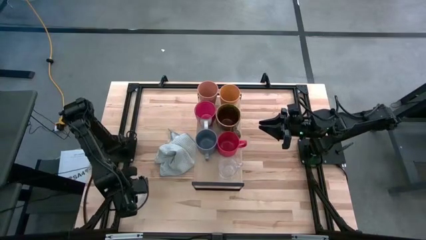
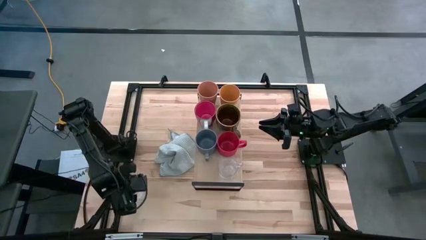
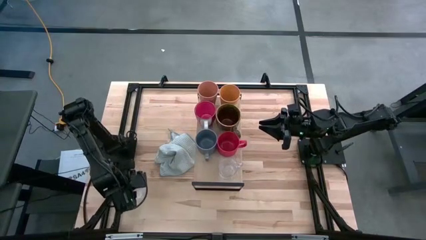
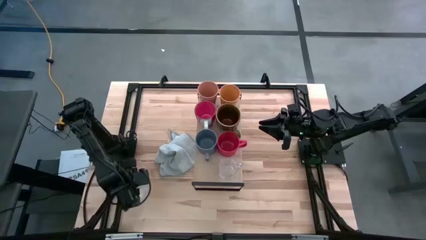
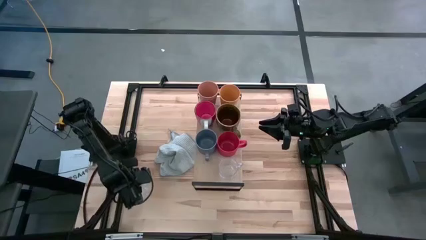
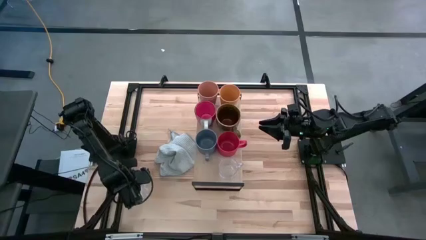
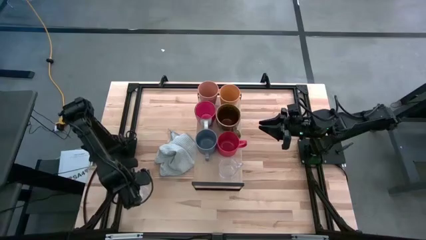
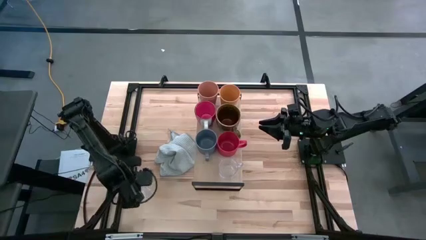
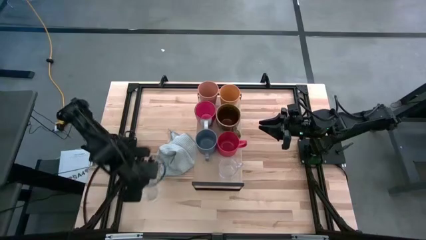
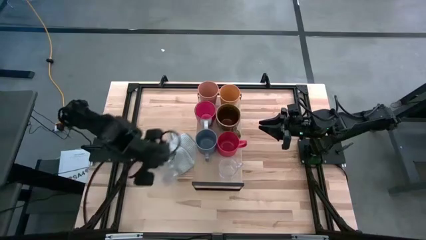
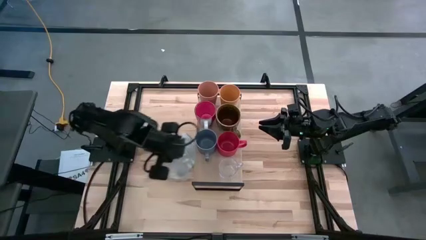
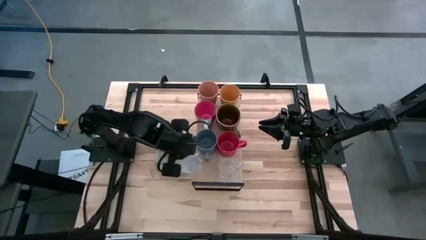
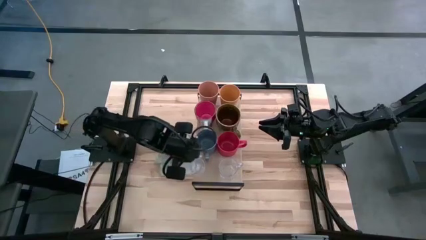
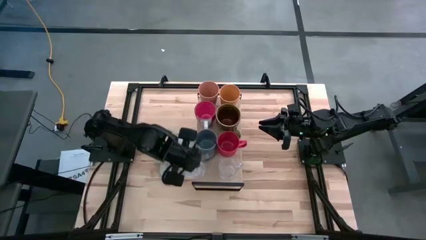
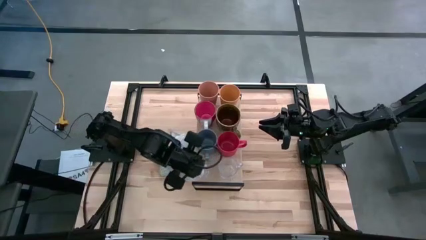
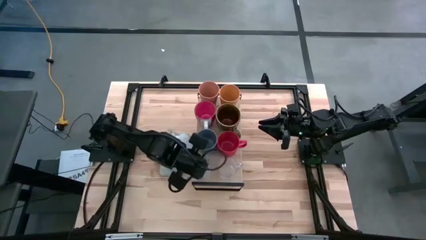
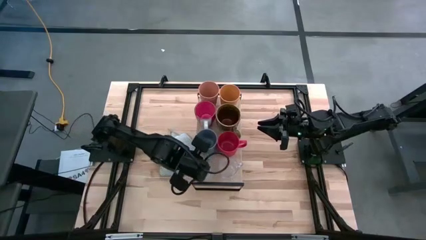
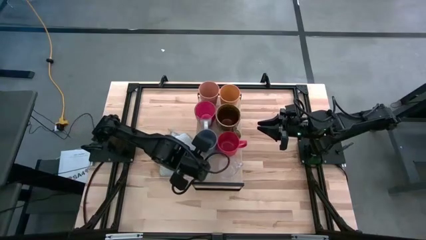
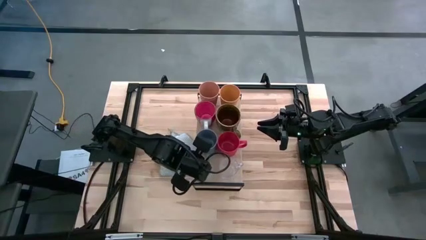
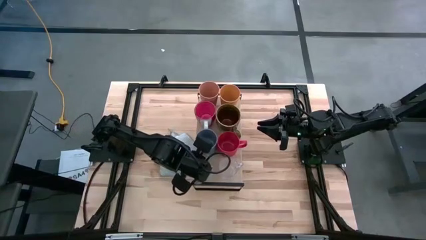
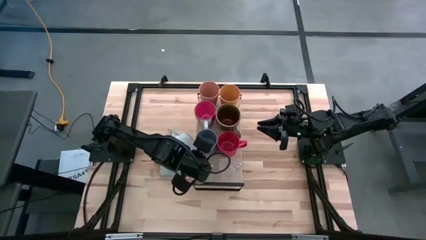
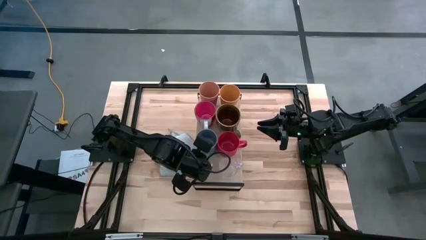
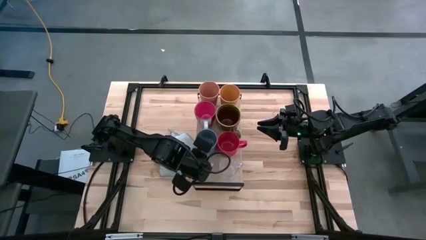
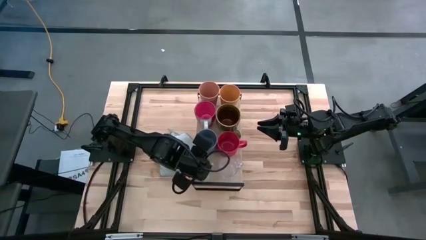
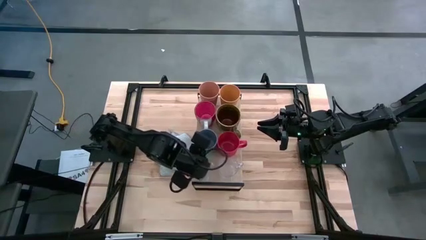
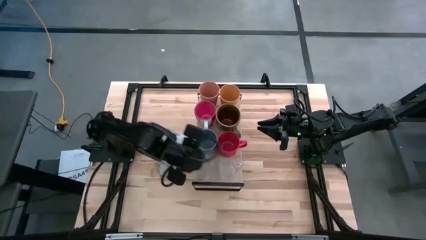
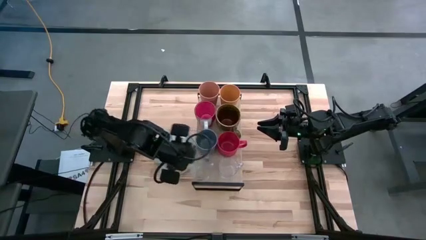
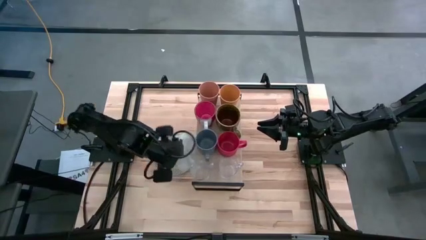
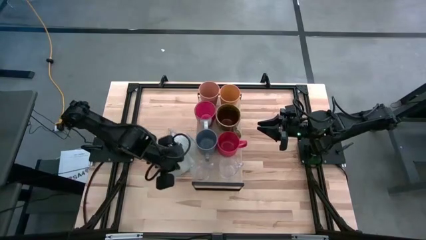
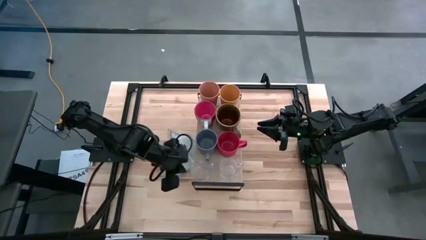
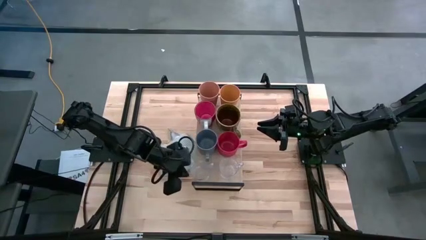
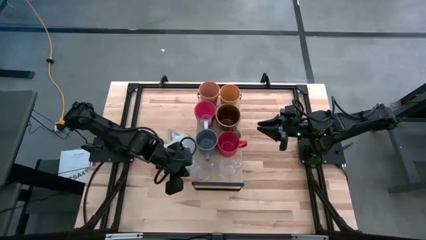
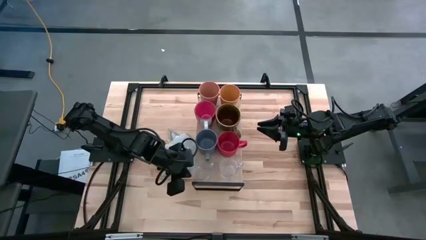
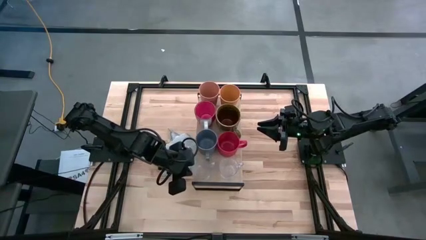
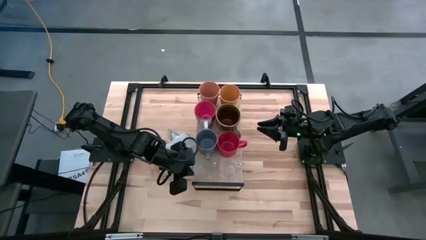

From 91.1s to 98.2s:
Task: Stack small to large cups/mugs on shelf
Put the transparent mug aligned with the other transparent mug on the shelf

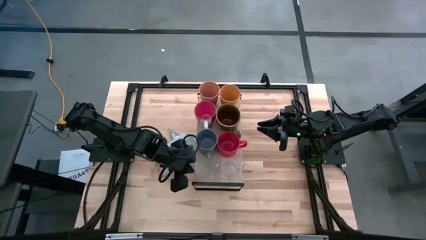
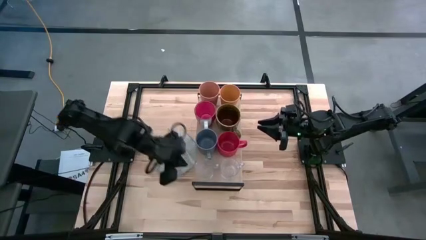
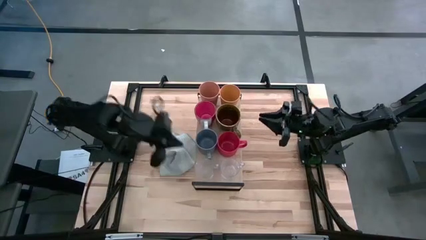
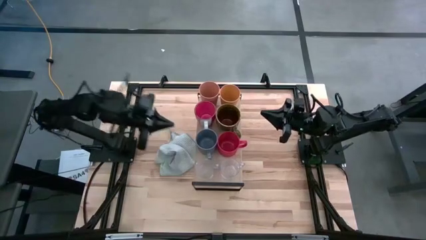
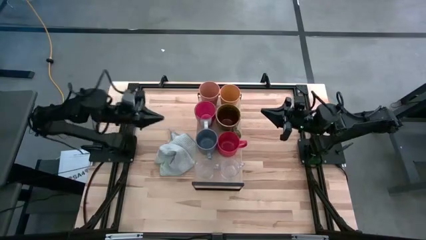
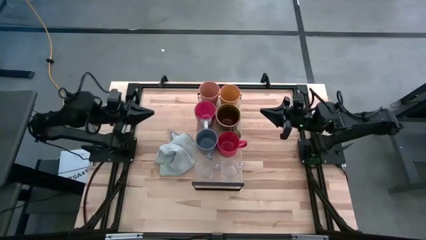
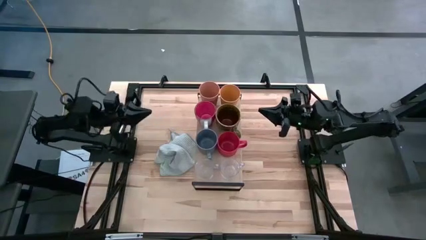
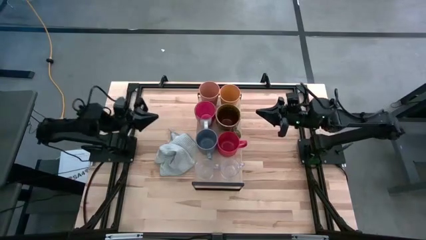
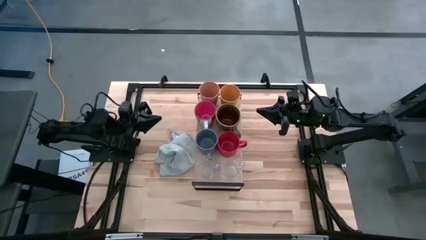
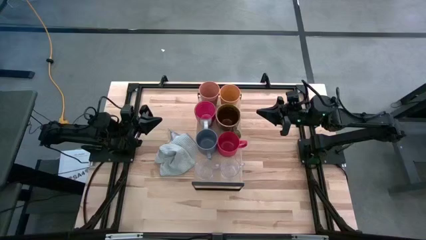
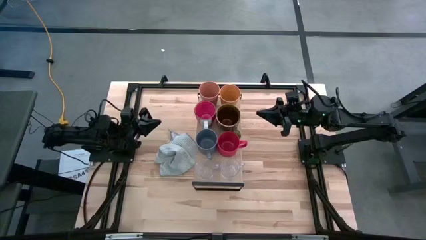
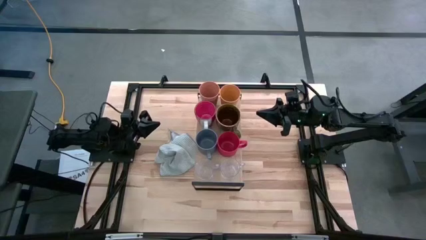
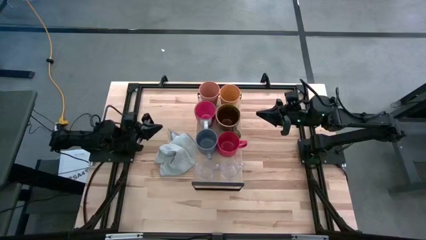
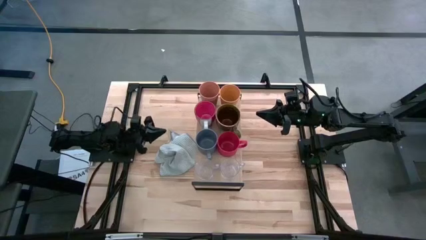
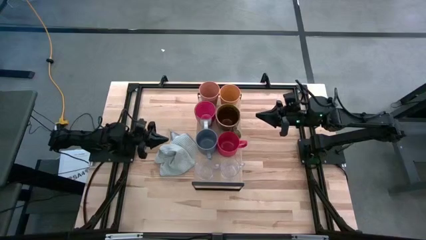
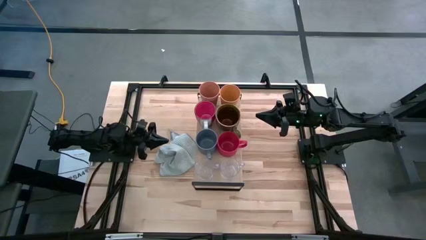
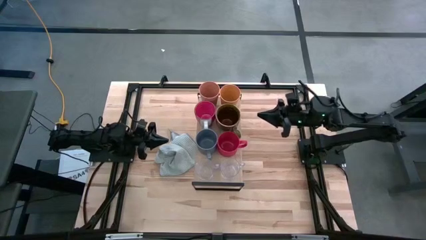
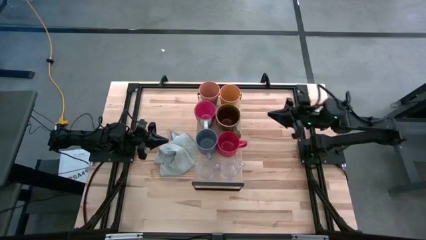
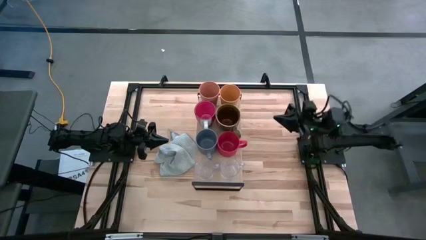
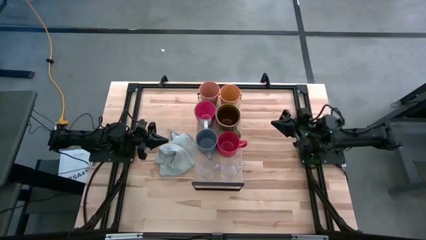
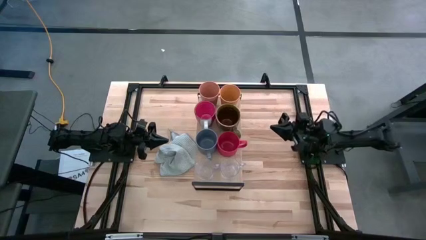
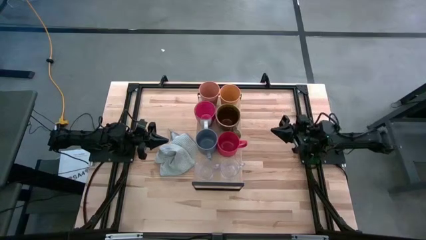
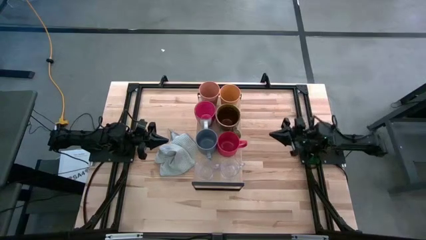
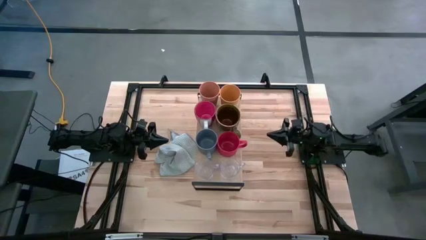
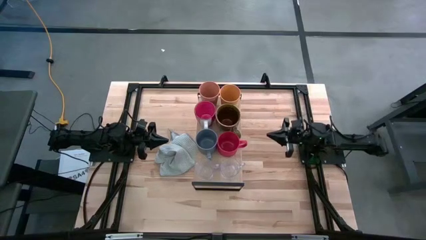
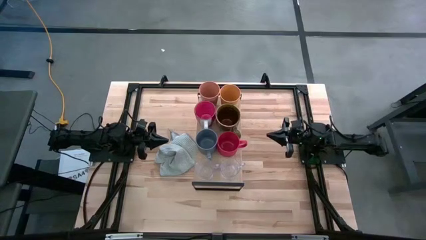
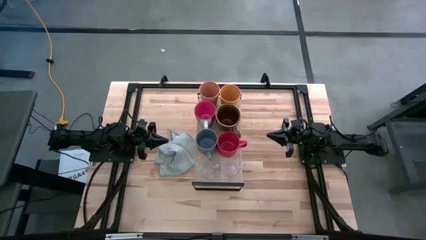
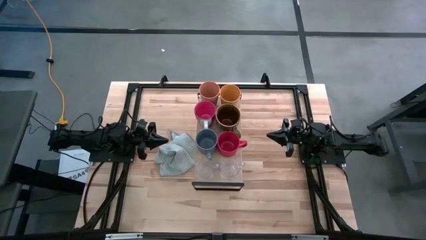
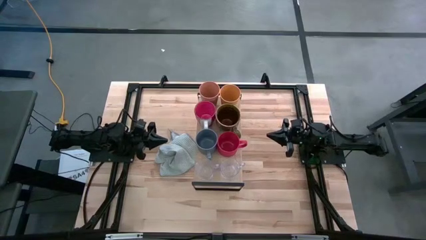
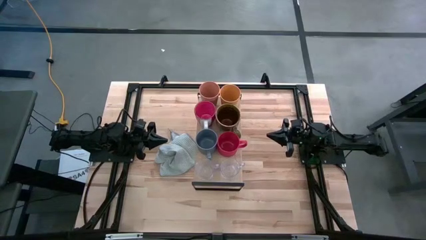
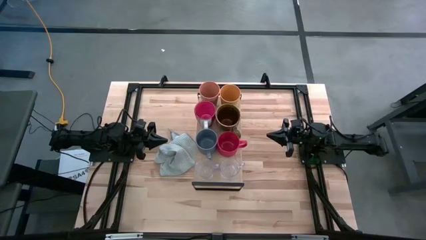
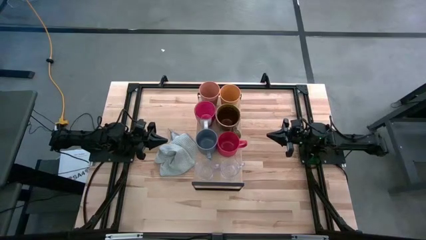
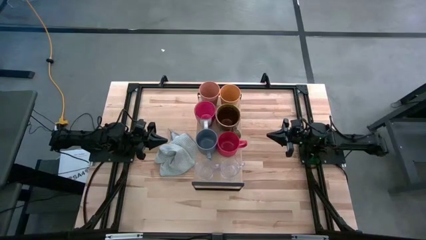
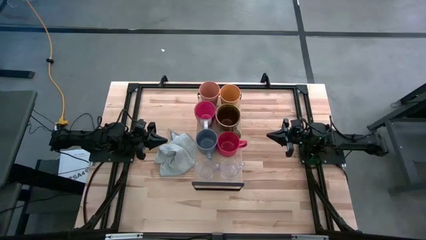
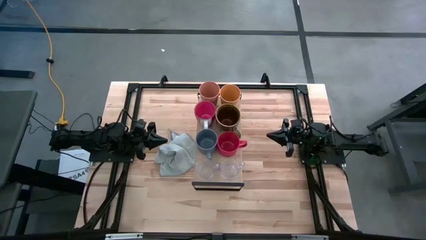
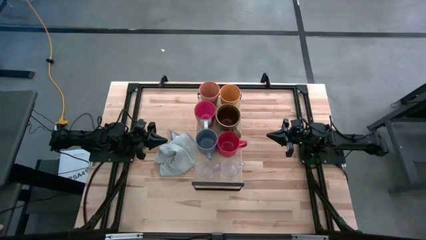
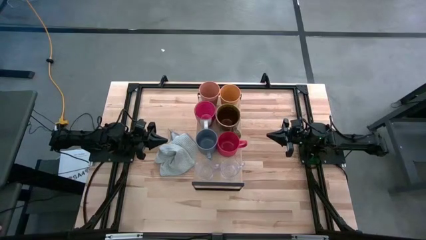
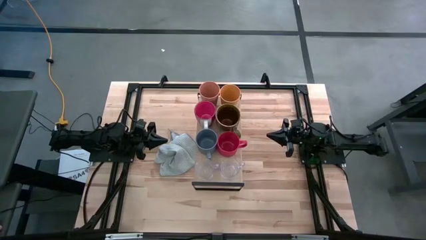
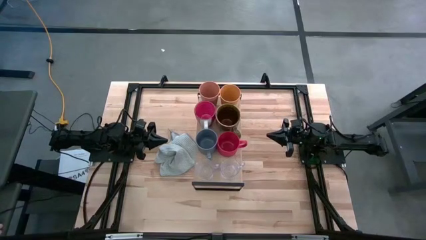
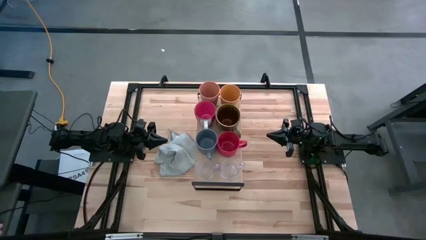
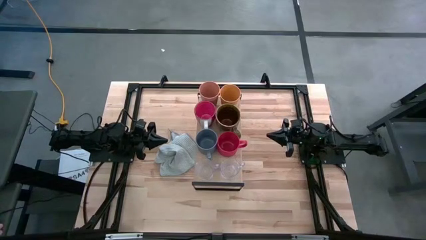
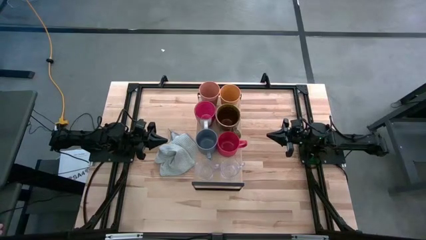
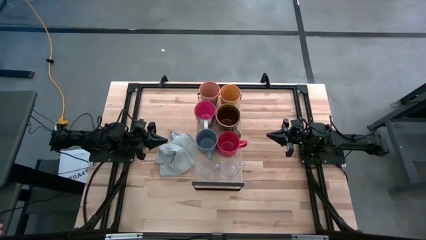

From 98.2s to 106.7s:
Return to Home Position

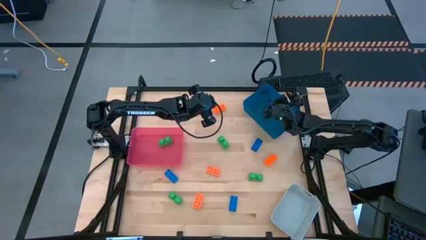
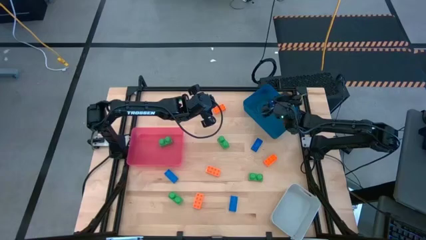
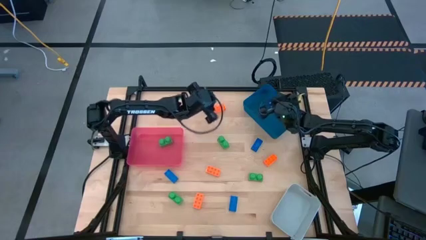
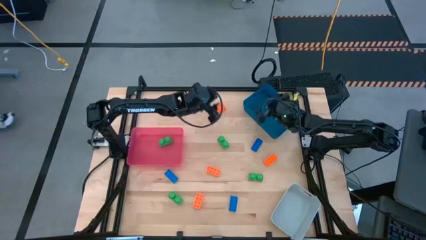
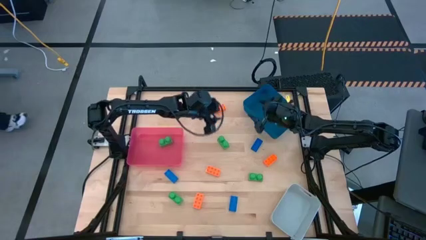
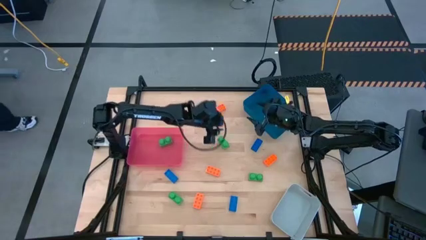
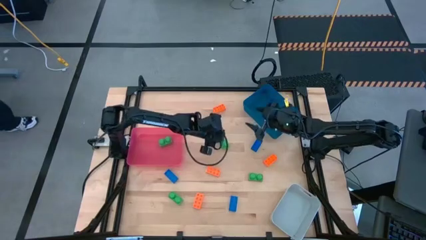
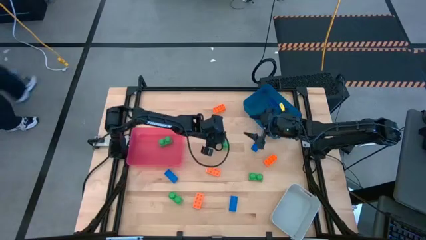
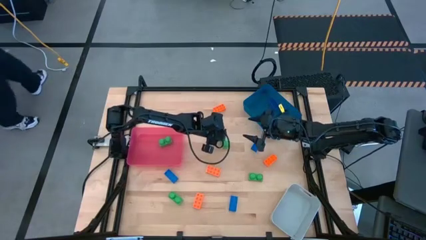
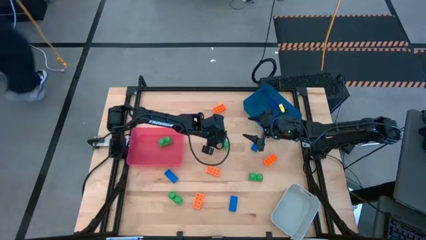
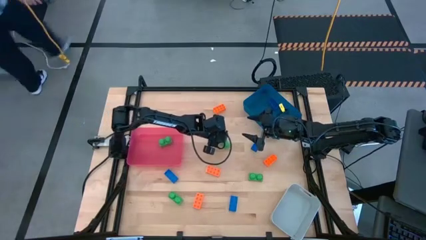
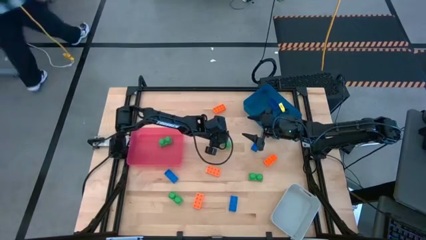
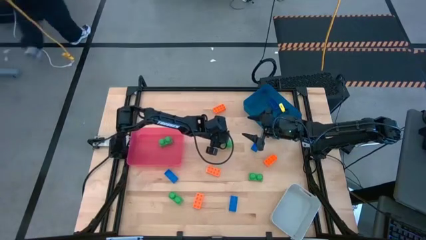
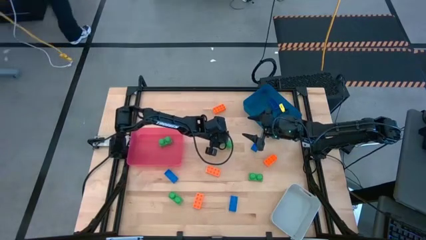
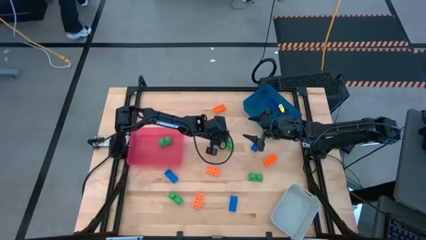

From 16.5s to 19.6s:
Task: Sort & place blocks by color
Put the green game piece into the red bin
